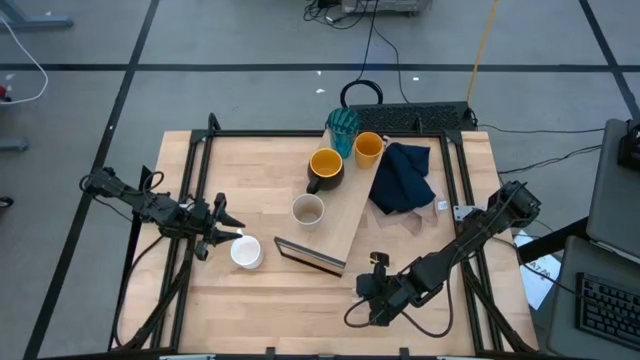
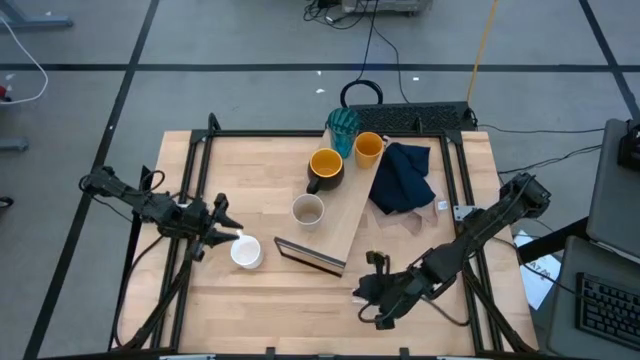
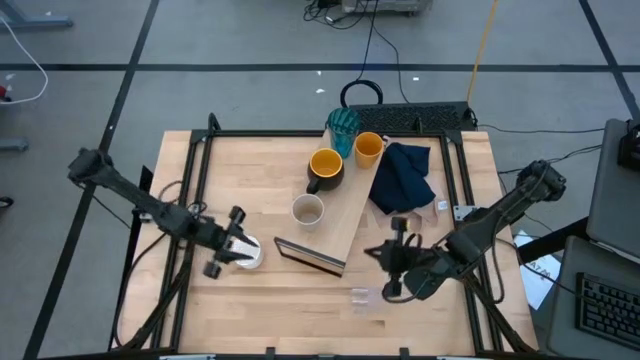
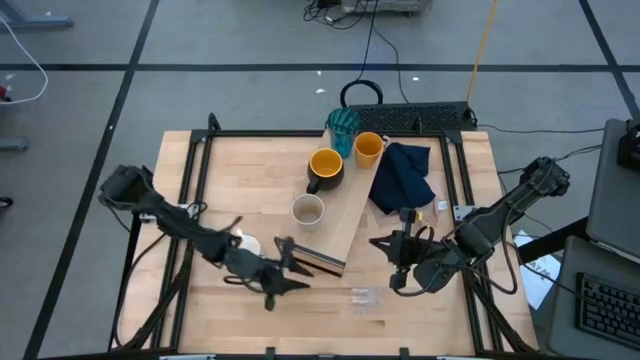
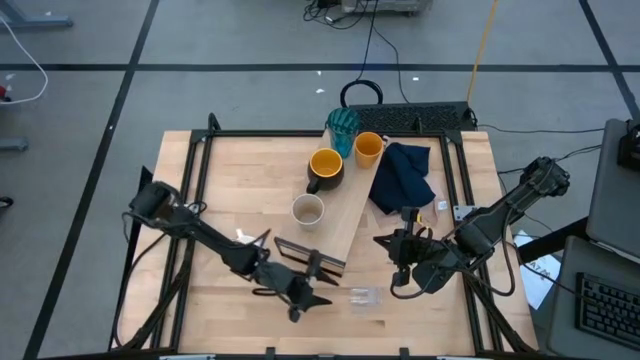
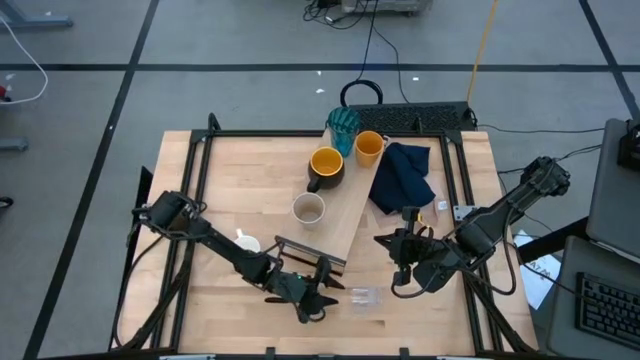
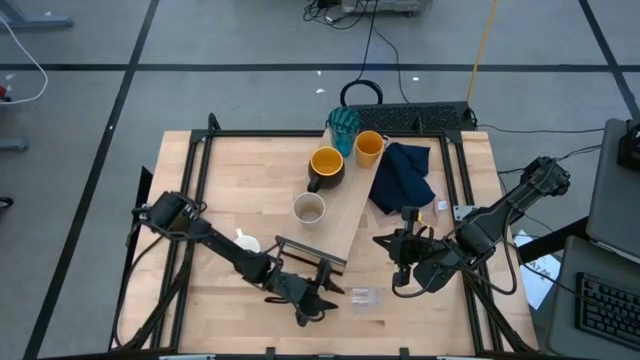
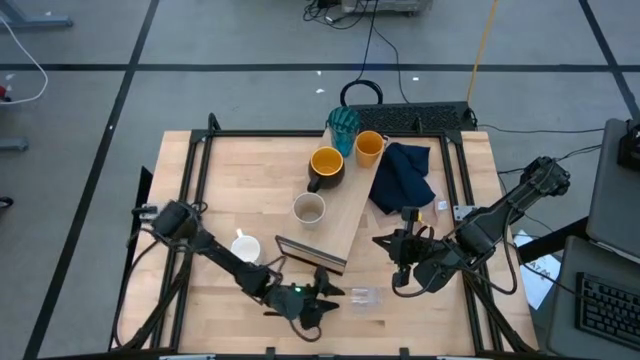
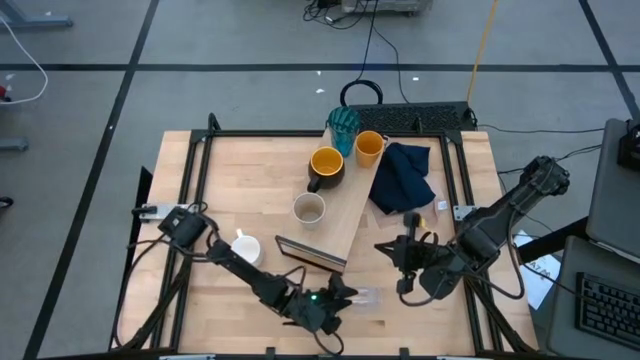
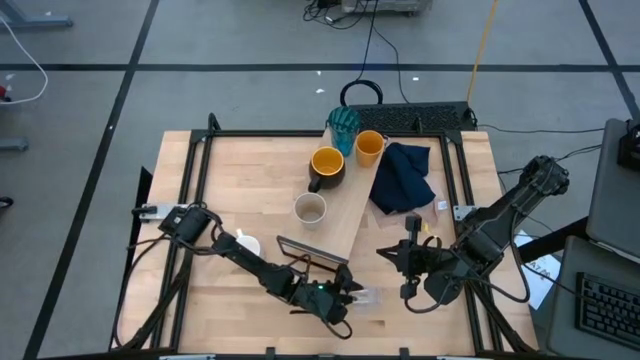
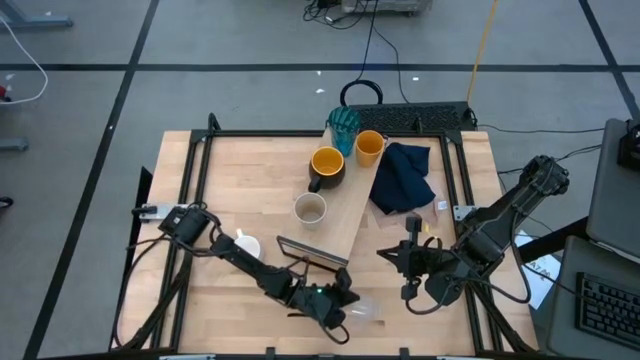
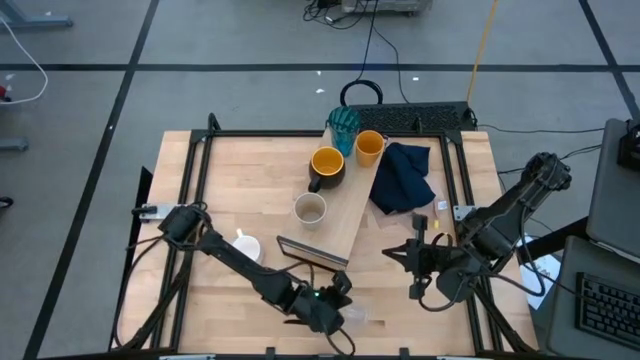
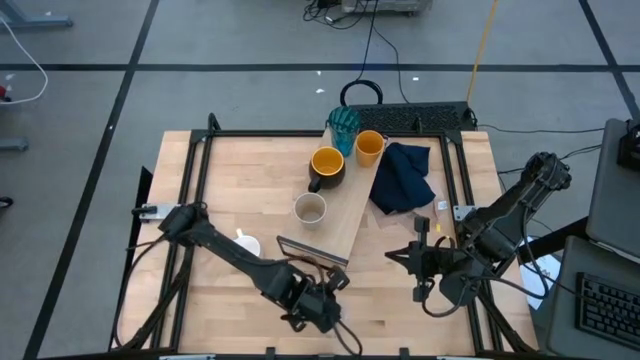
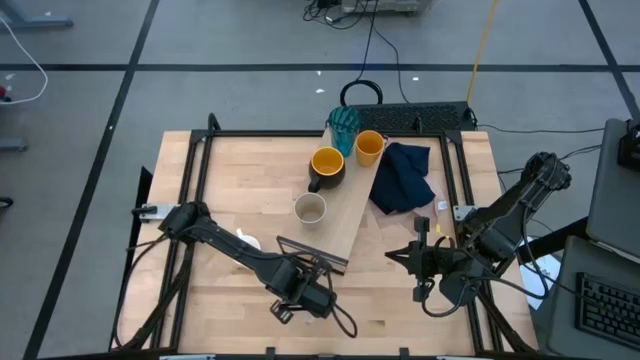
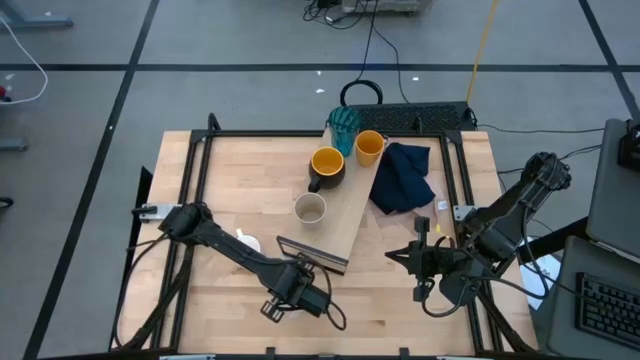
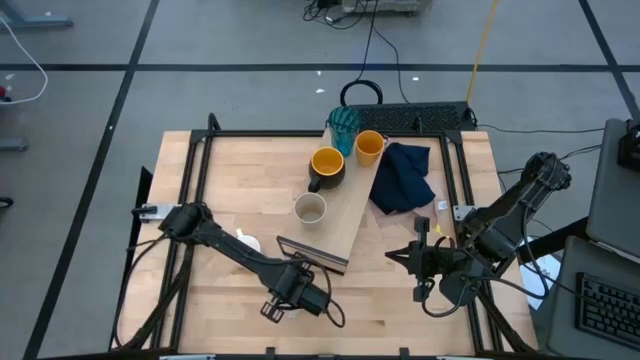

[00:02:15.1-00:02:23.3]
Task: Stack small to large cups/mugs on shelf
Adjust the transparent mug

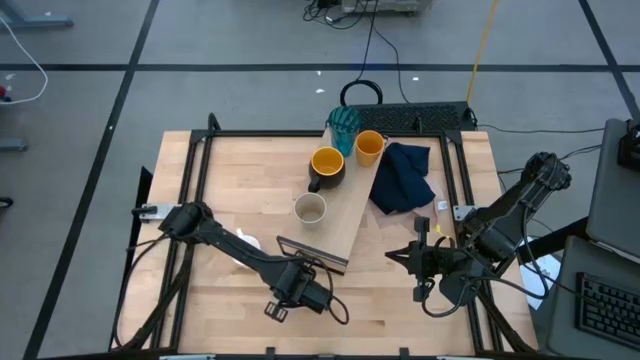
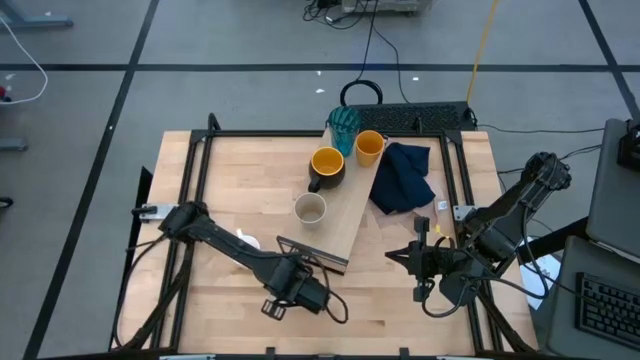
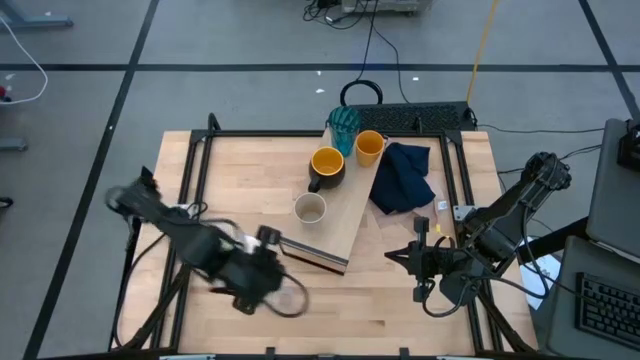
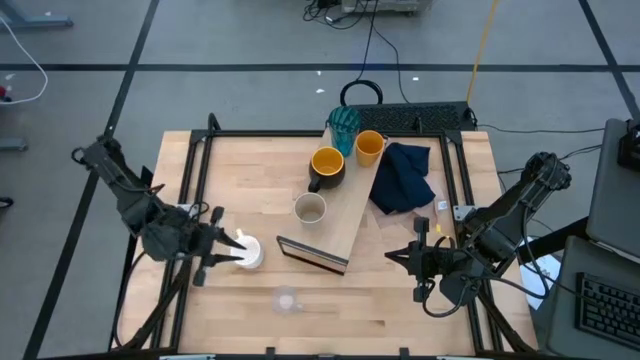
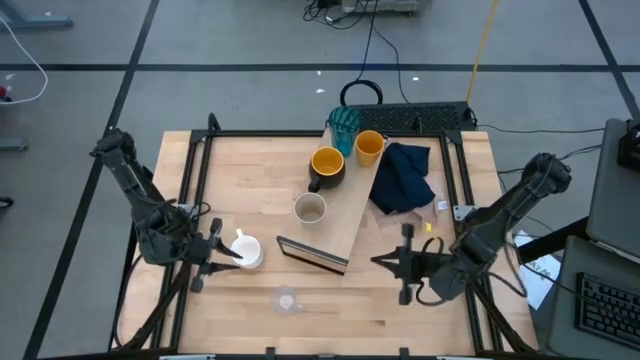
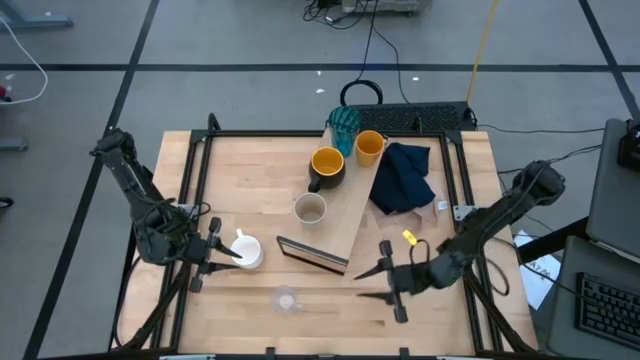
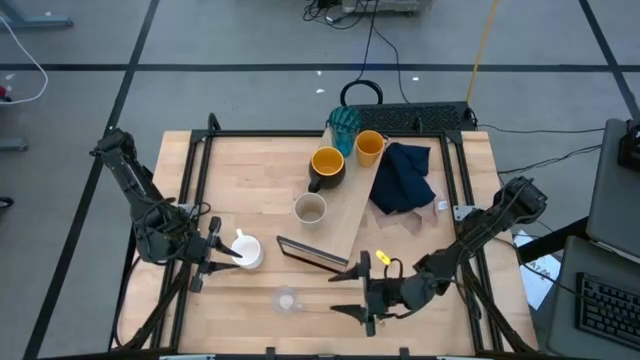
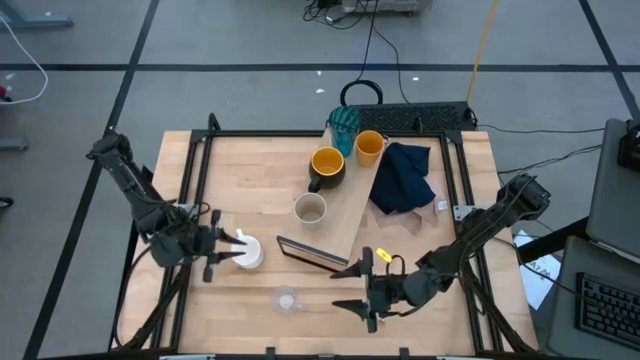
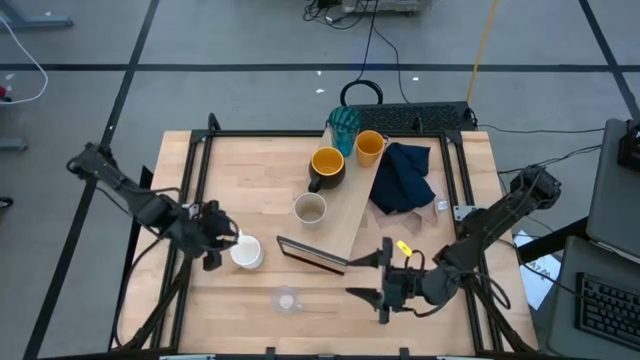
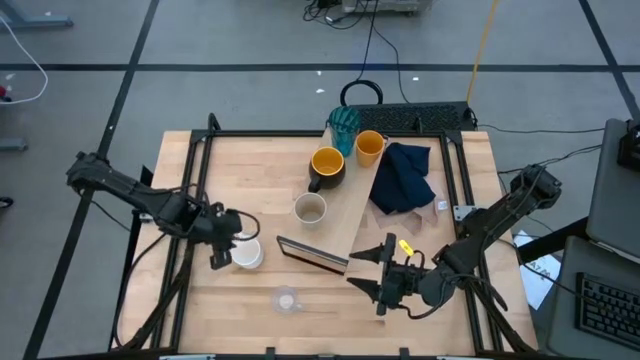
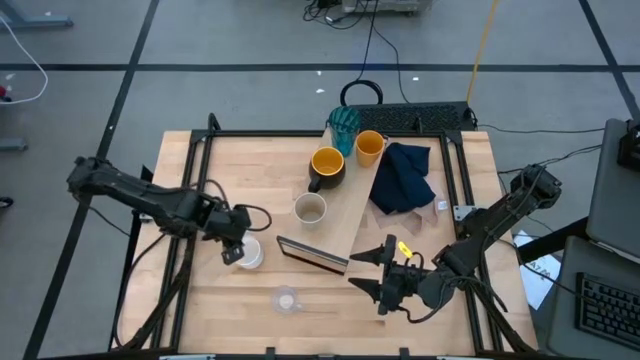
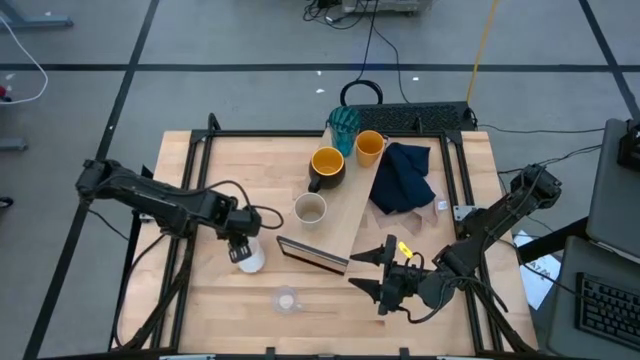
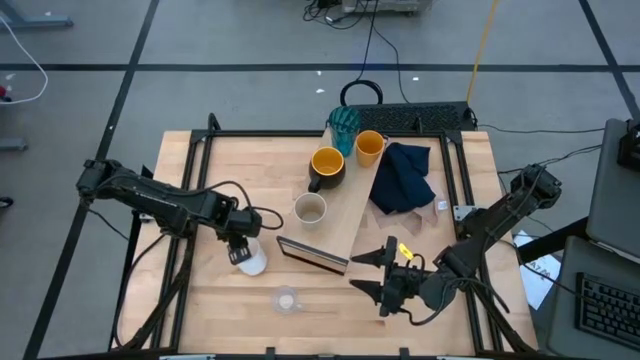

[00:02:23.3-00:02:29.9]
Put the white mug on the shelf

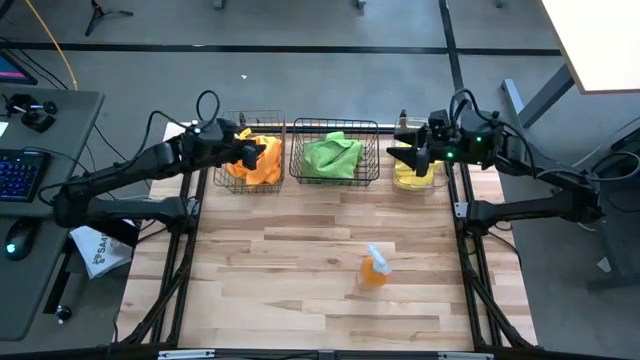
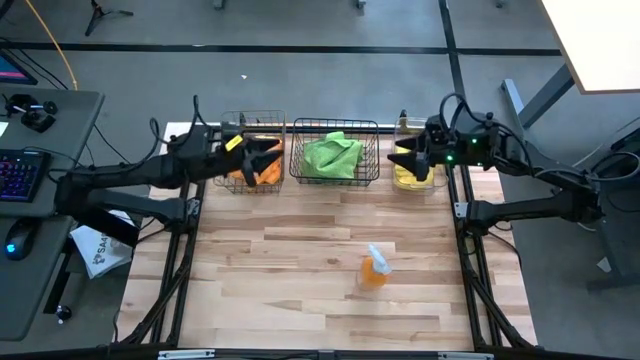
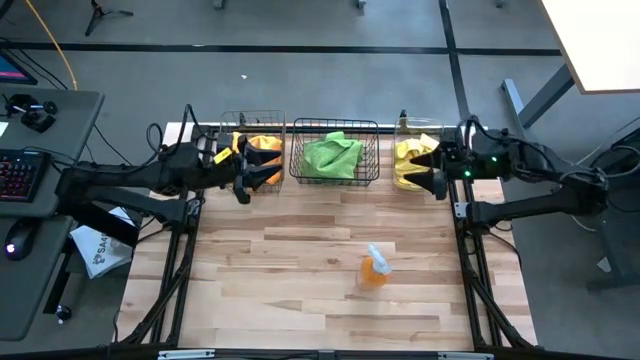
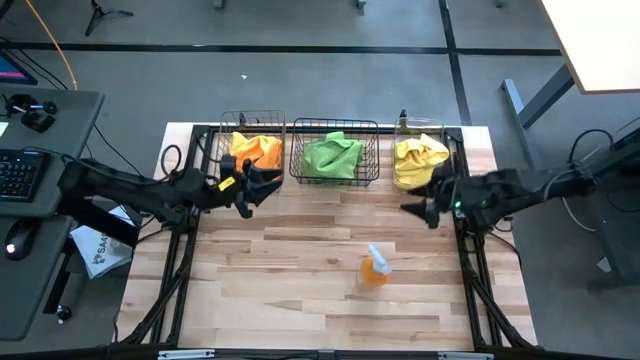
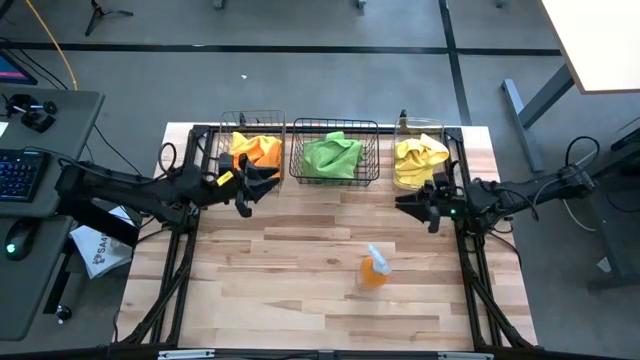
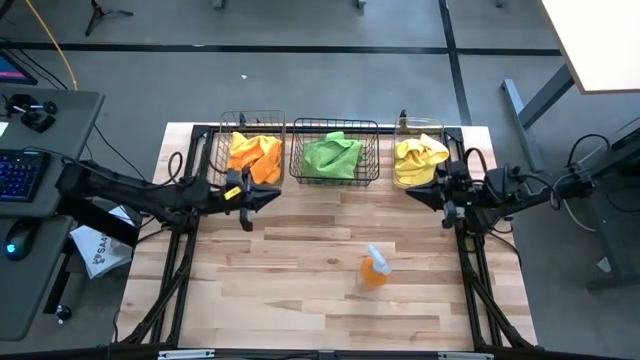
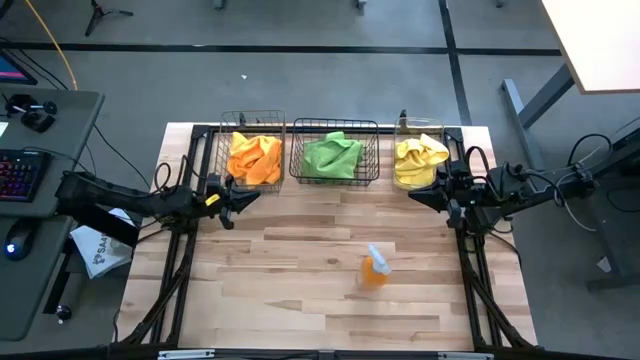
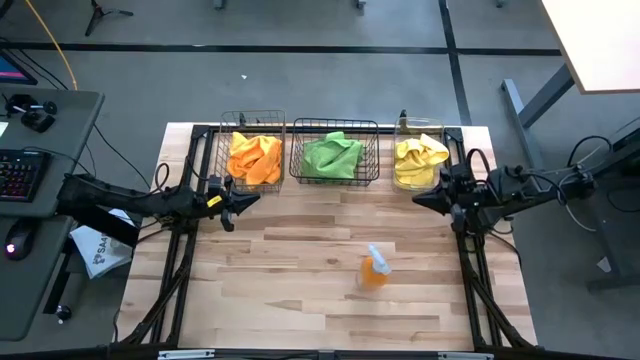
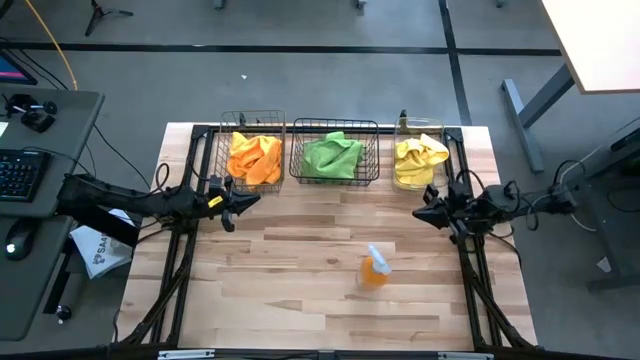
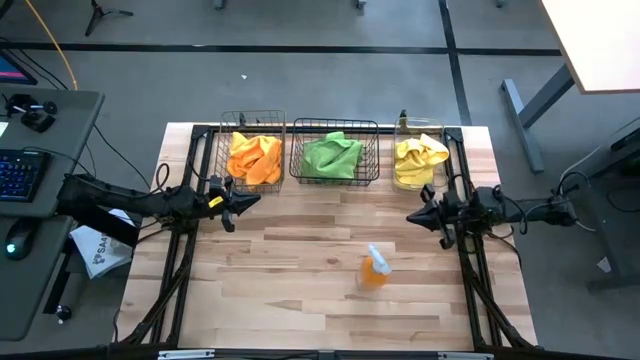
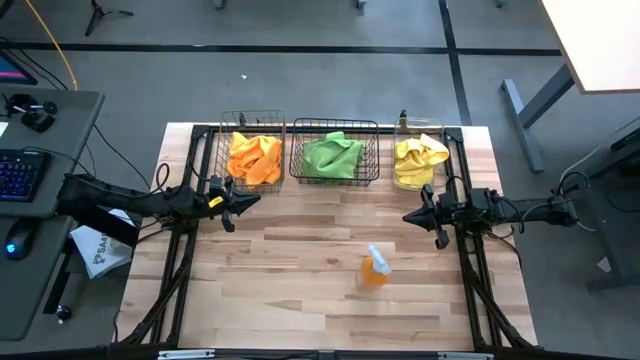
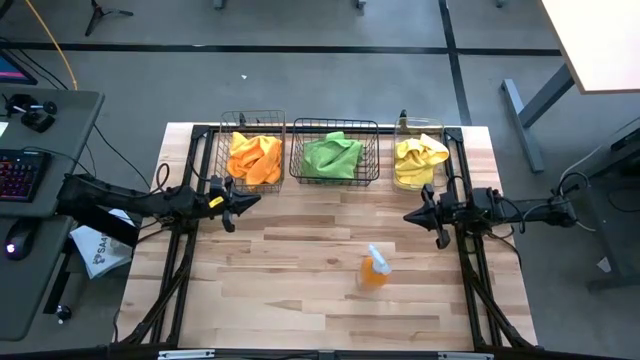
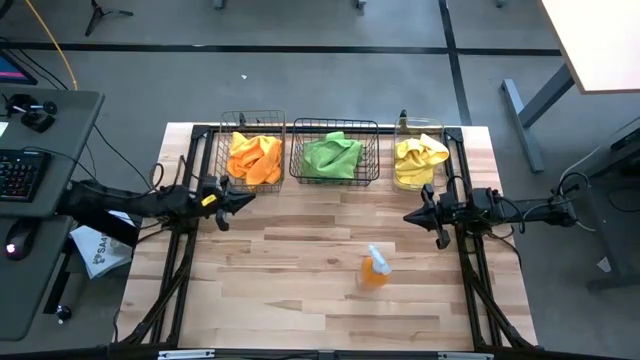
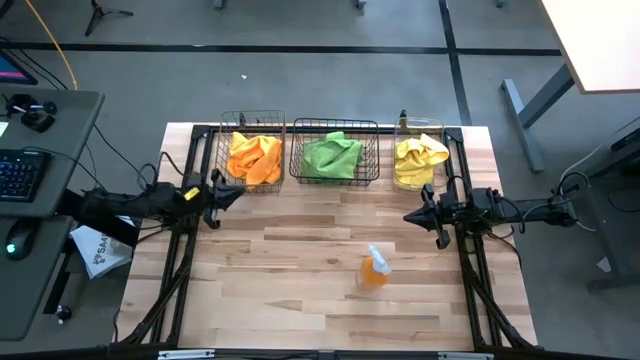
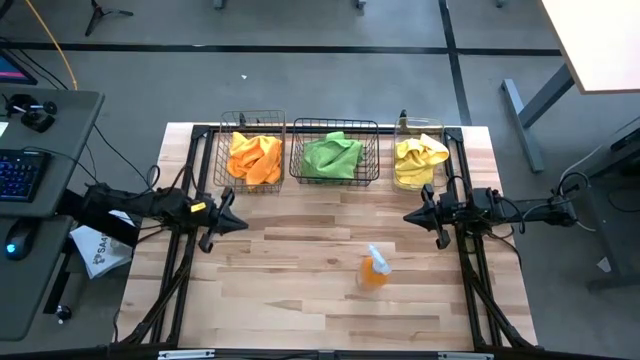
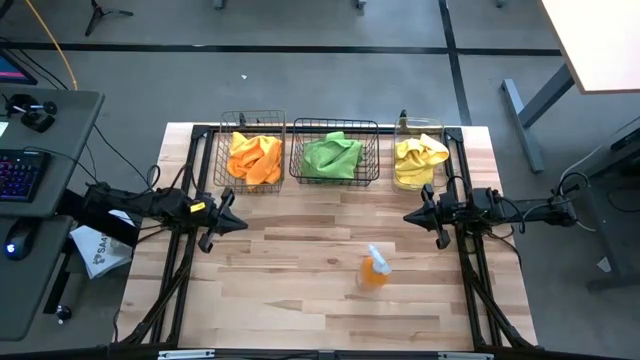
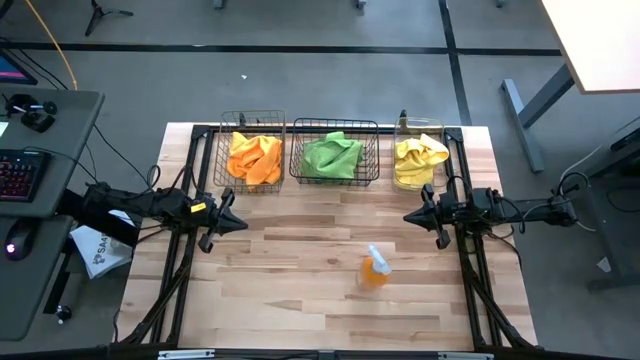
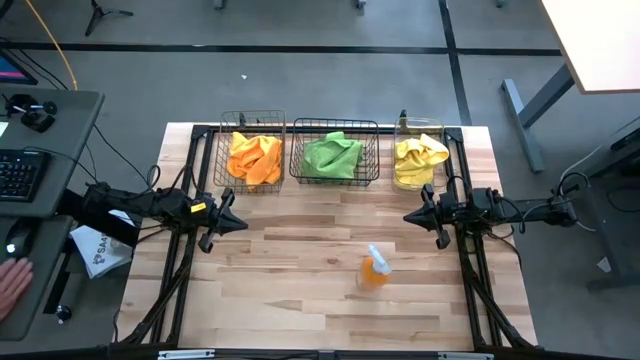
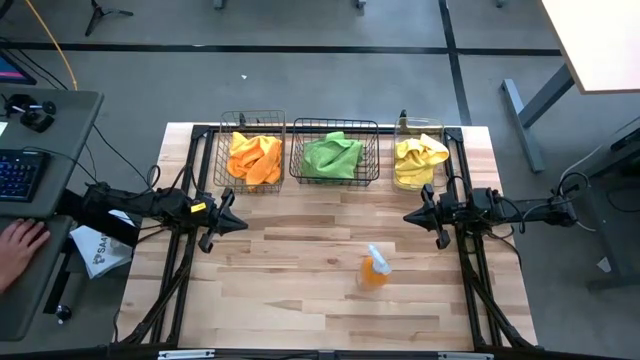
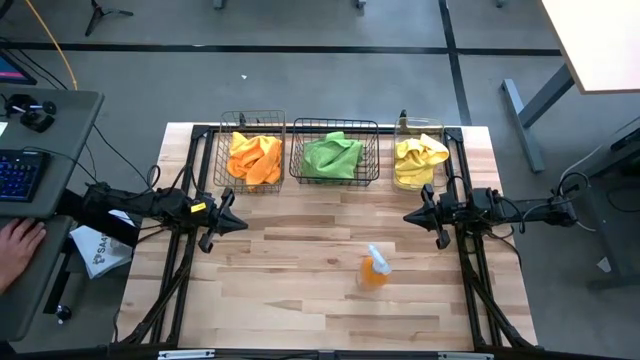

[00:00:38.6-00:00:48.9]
Task: Sort microfiber towel by color & place in baskets
Return to Home Position
